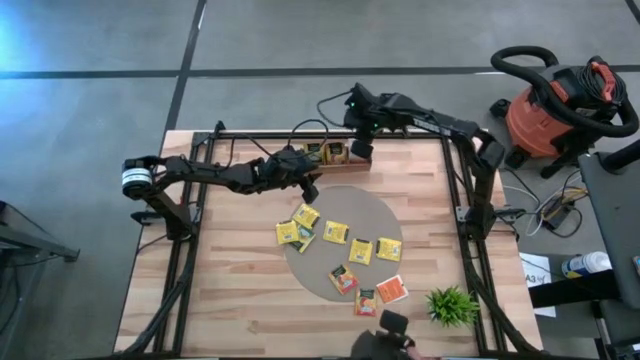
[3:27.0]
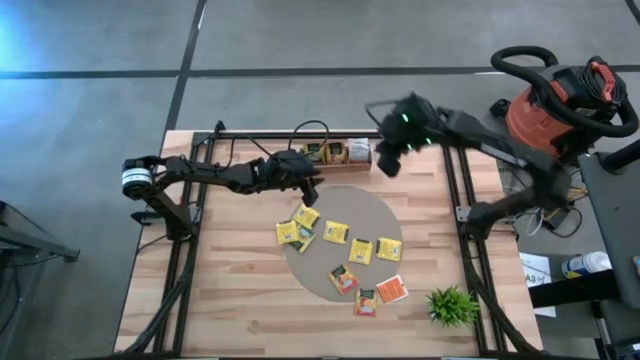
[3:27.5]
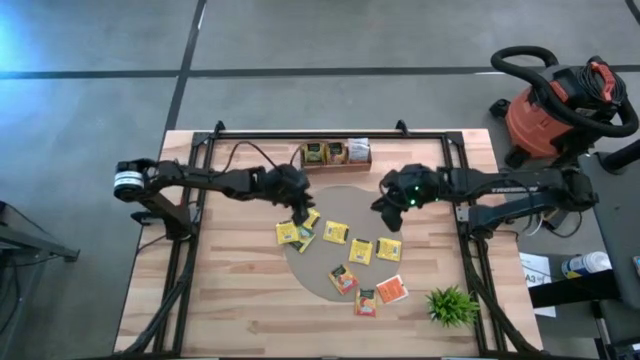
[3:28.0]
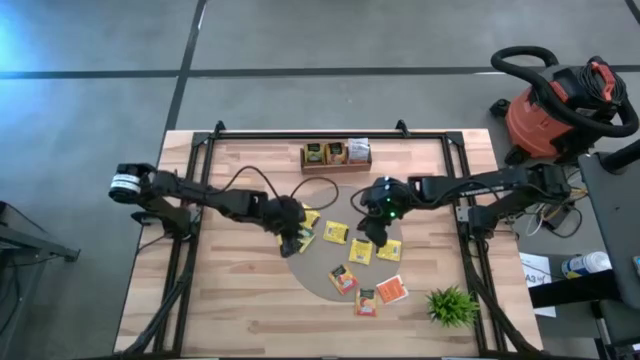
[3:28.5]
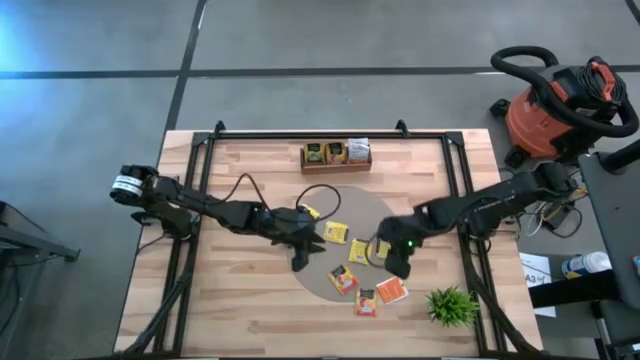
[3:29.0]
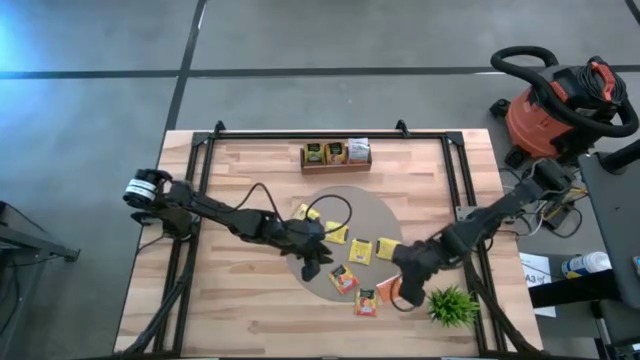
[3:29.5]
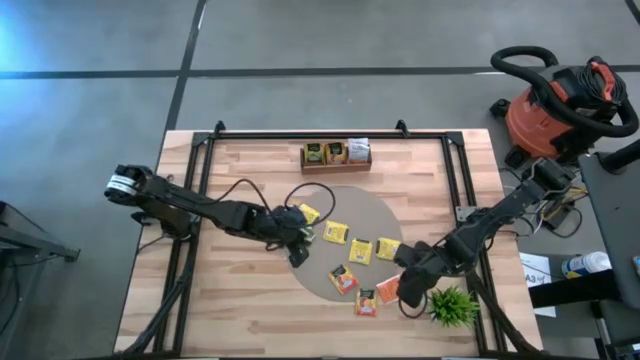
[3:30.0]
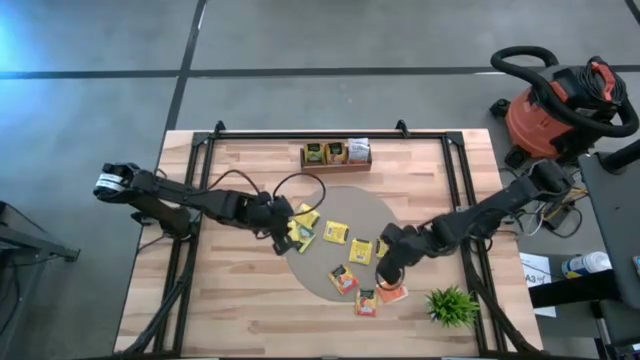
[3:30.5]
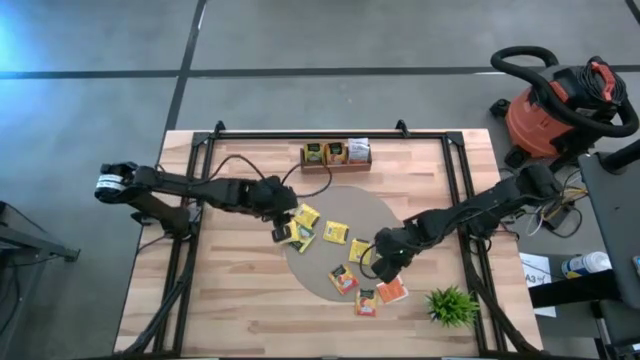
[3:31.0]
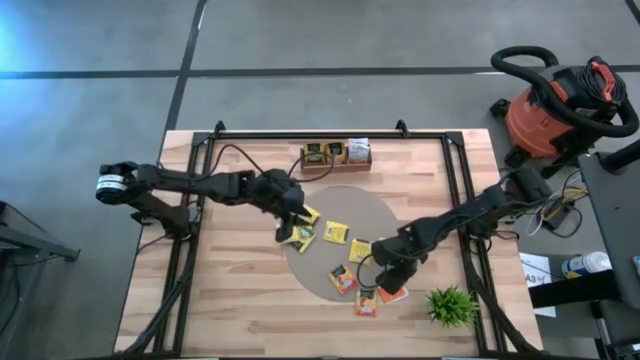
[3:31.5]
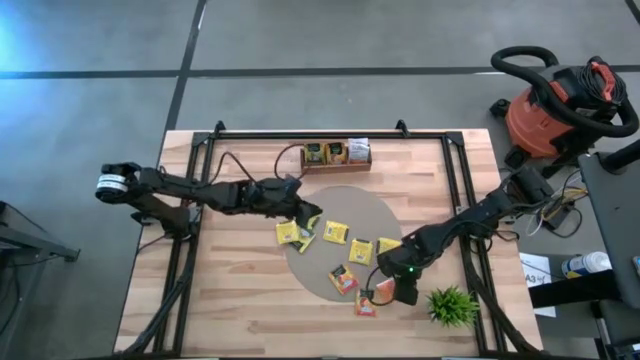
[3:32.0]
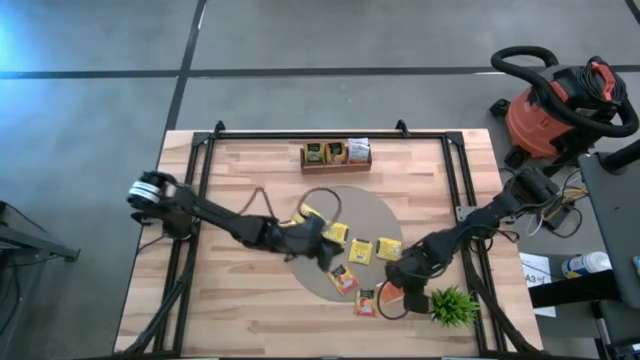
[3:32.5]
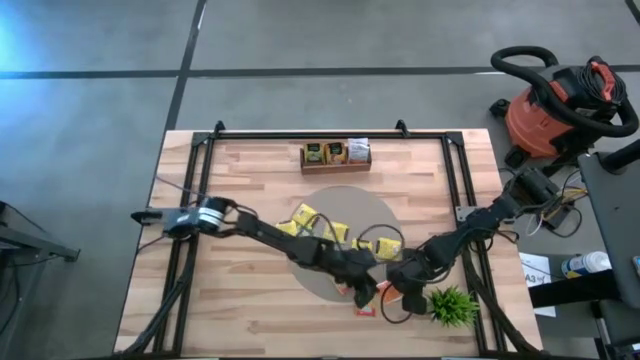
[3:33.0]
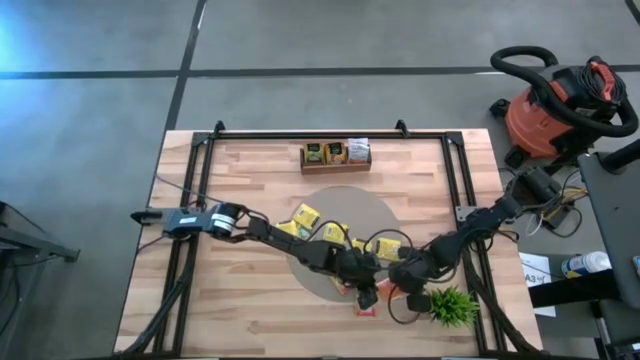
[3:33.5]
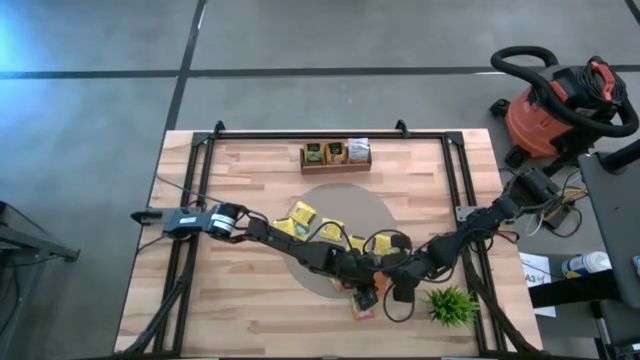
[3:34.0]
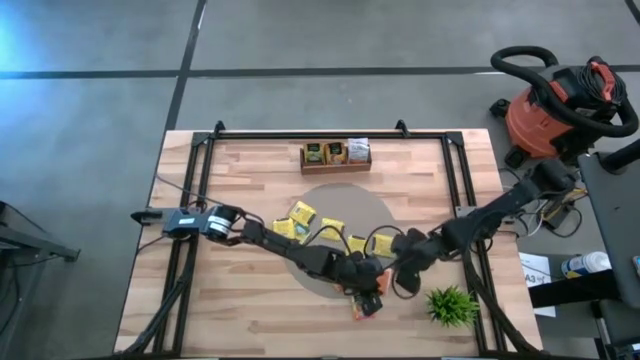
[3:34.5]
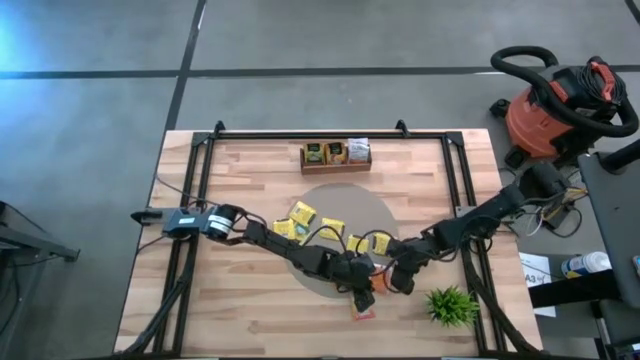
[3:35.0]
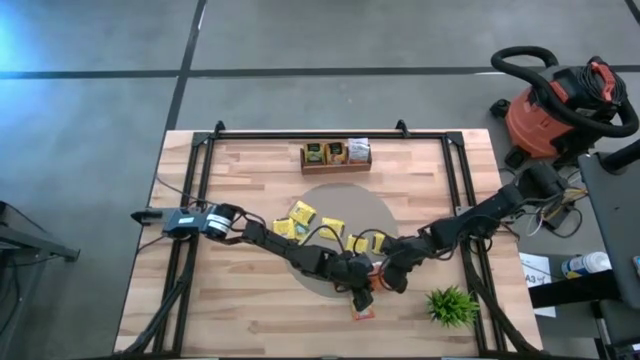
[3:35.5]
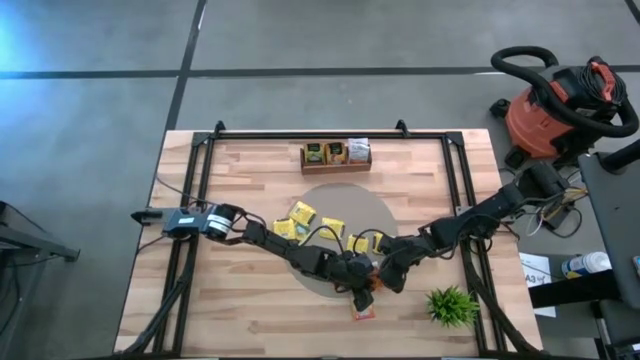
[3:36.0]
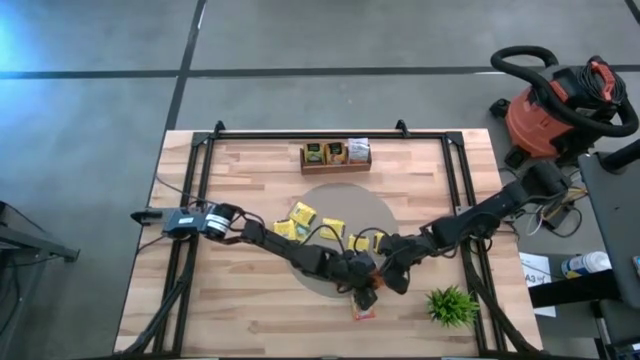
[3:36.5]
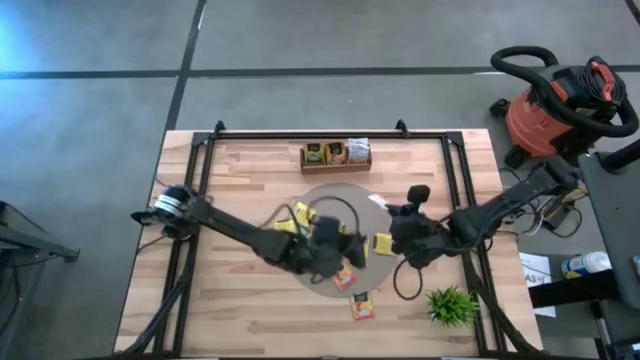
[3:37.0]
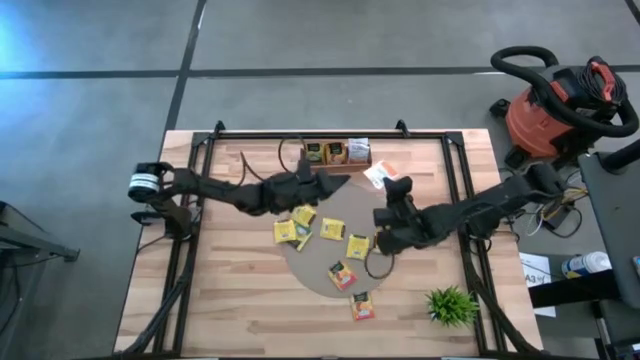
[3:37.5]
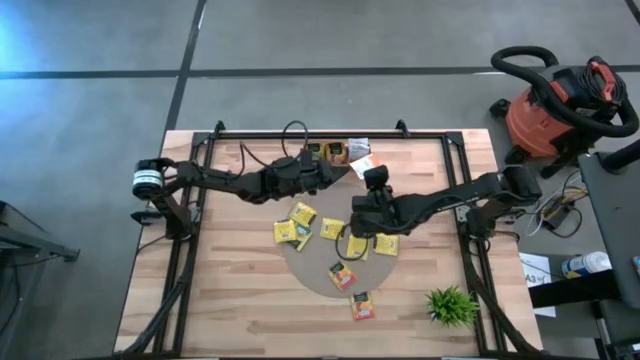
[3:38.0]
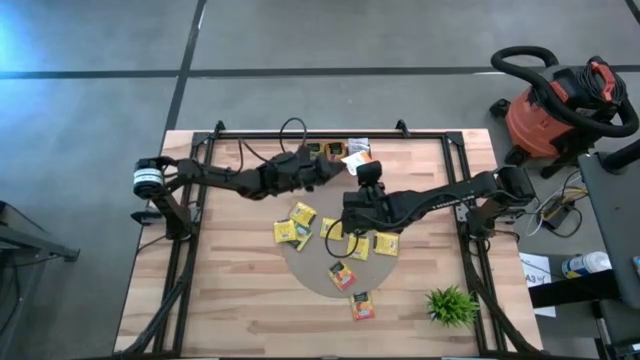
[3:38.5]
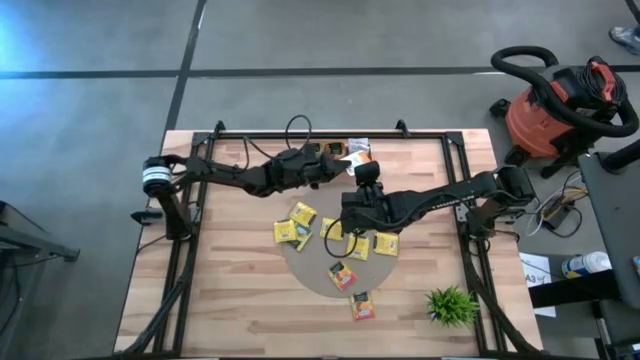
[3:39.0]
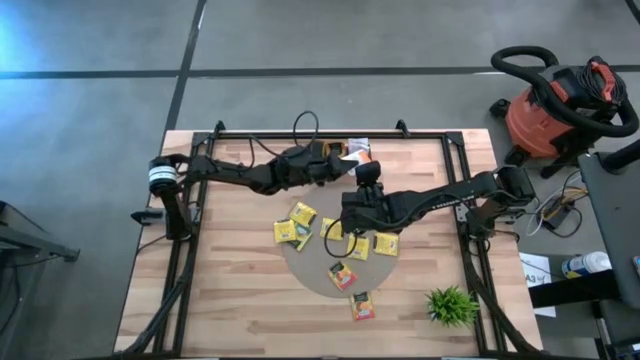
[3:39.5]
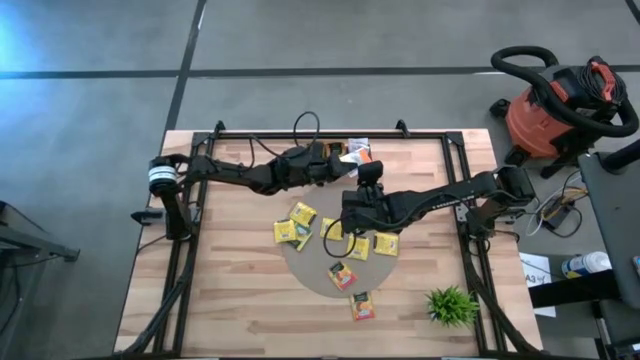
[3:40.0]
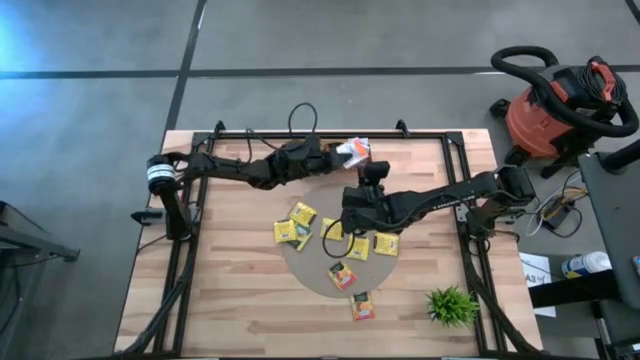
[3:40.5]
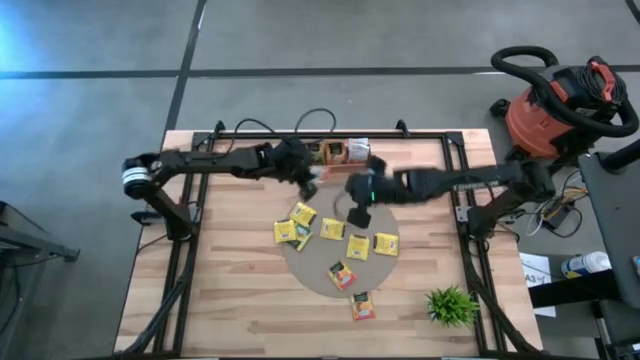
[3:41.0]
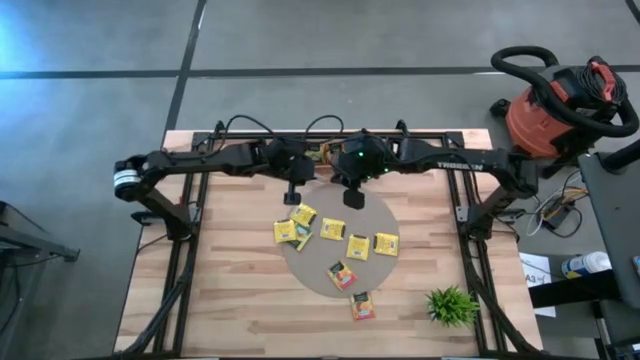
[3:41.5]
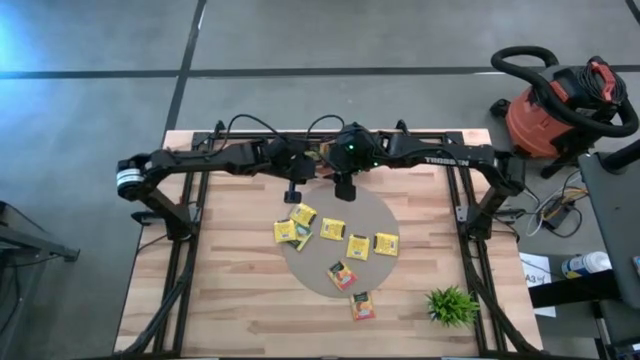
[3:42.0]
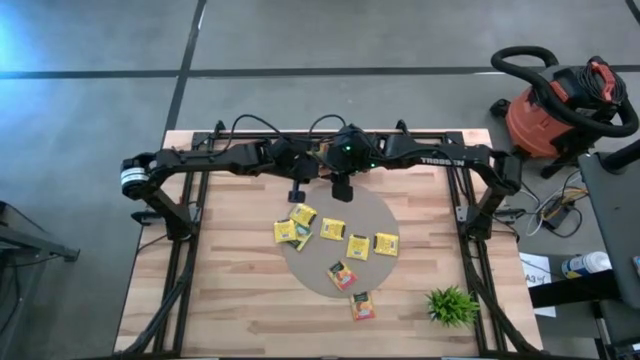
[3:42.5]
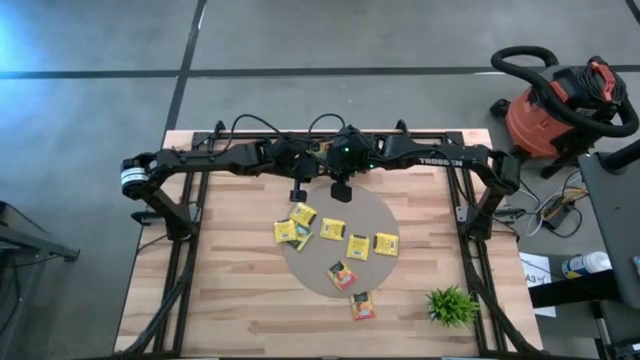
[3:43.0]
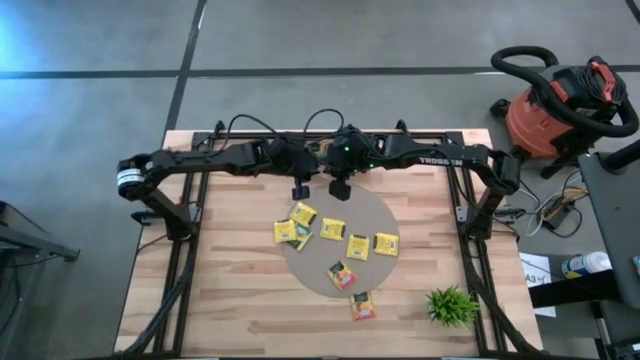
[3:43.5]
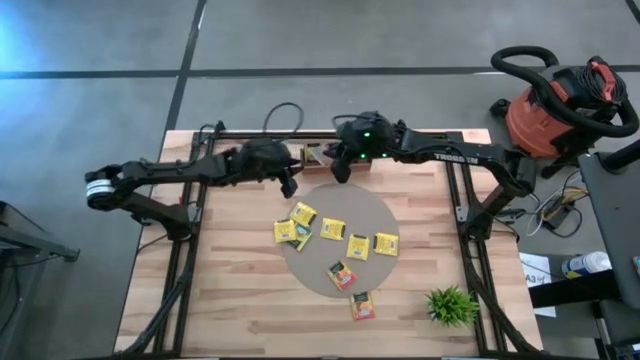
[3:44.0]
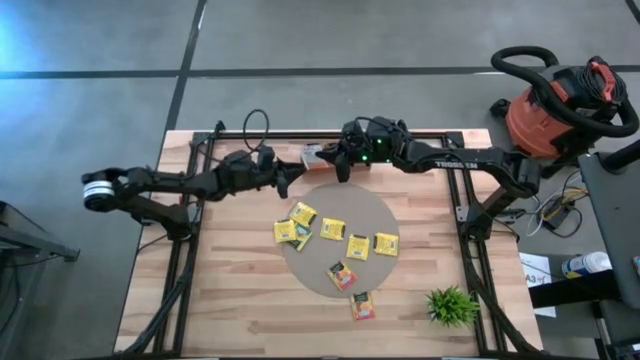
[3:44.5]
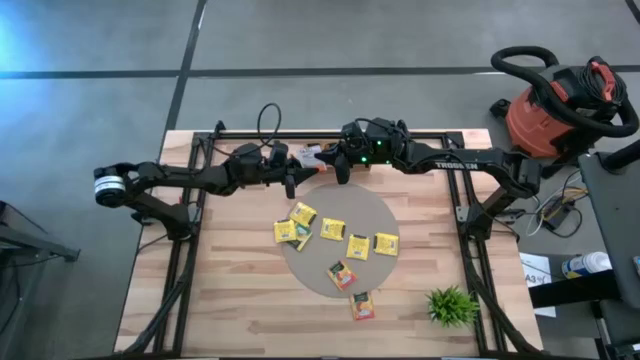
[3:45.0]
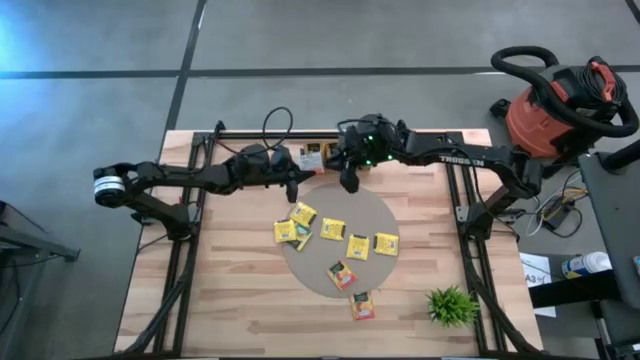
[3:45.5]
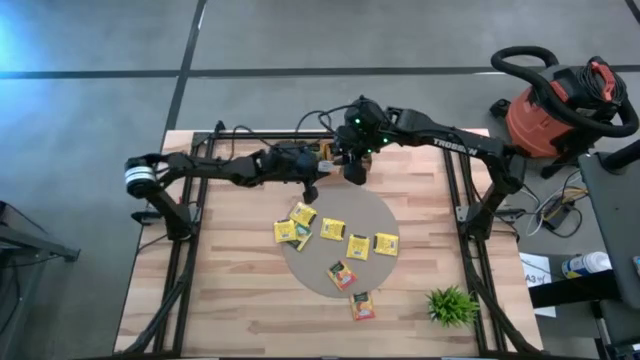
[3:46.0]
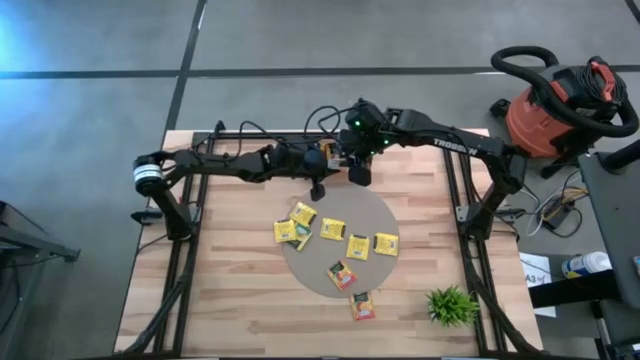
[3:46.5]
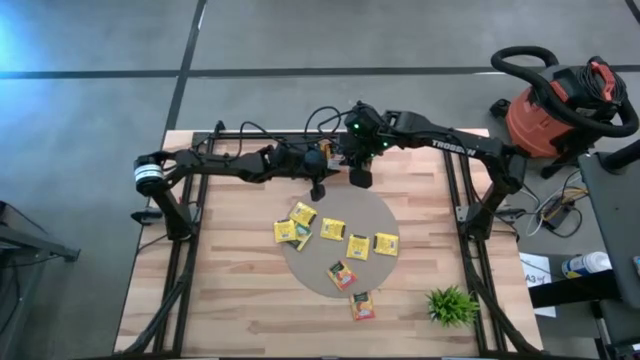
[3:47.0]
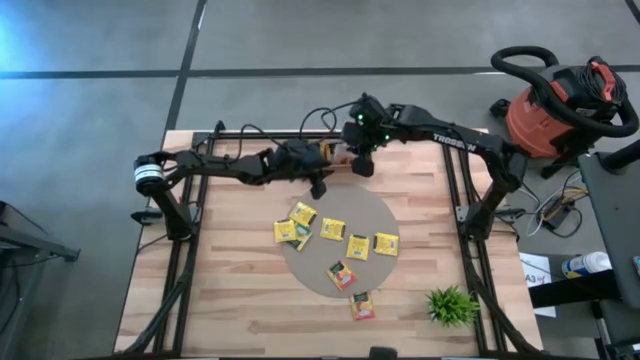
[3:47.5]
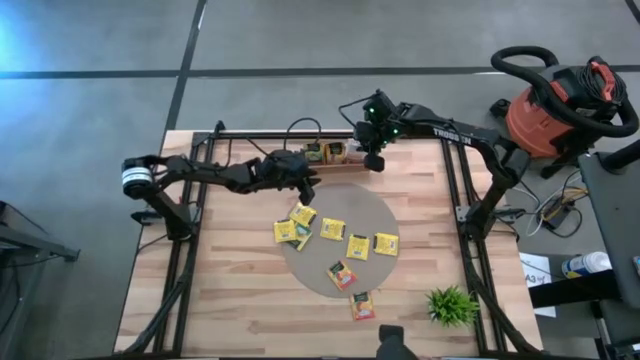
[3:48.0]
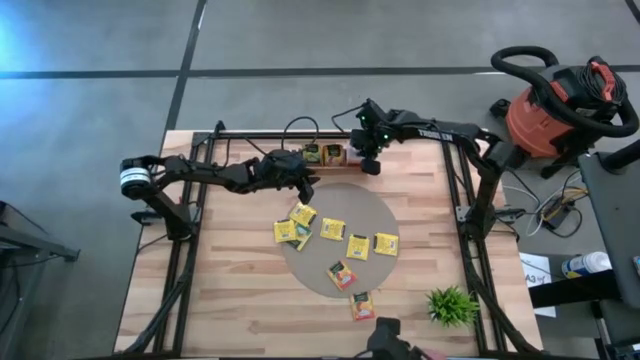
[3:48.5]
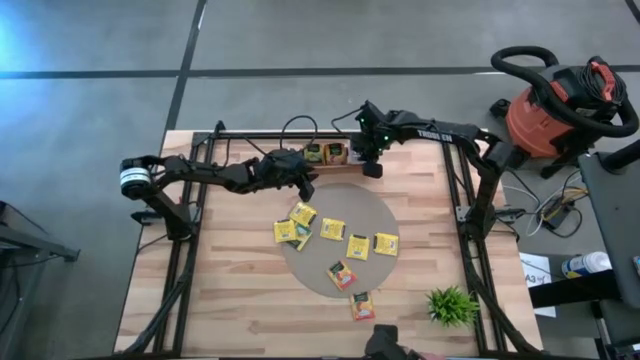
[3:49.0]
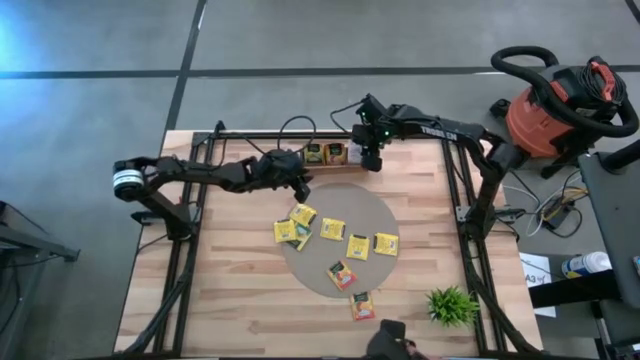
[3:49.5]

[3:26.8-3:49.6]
Task: Pick & Place Tea
Put the white tea bag into the right compartment of the wooden organizer
